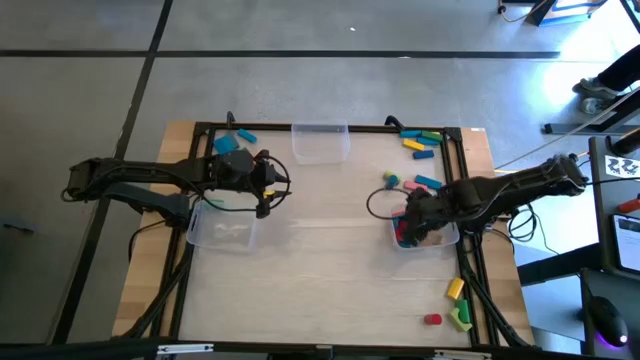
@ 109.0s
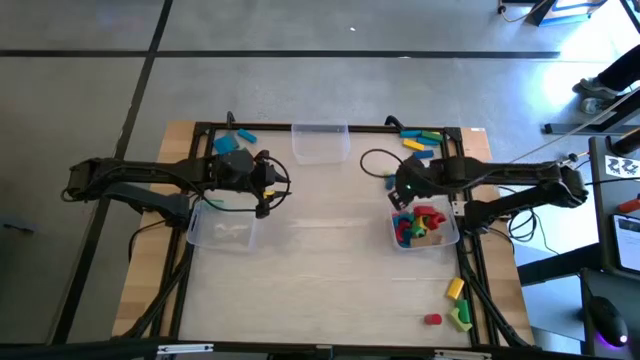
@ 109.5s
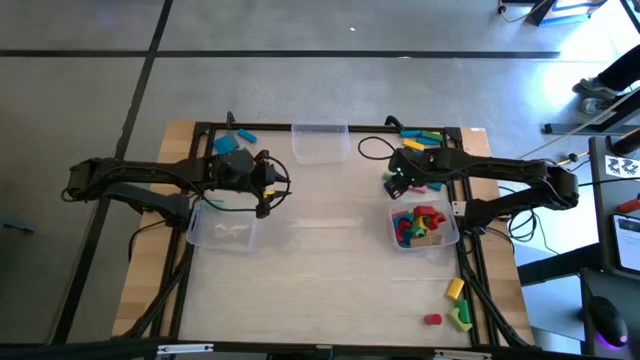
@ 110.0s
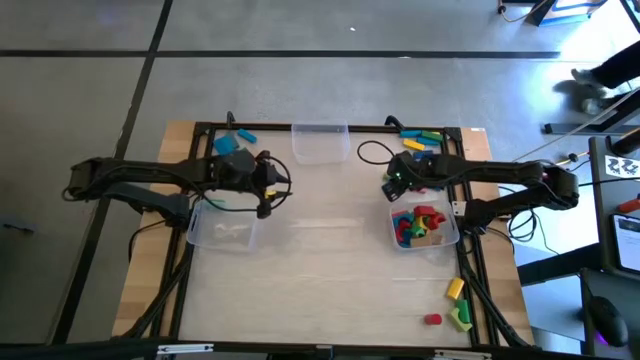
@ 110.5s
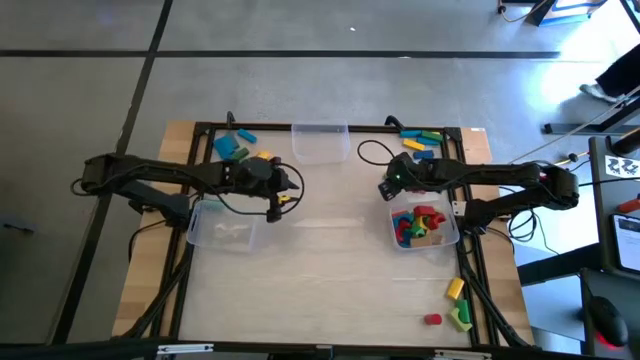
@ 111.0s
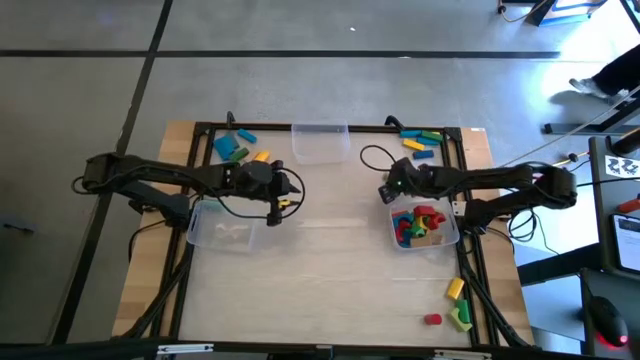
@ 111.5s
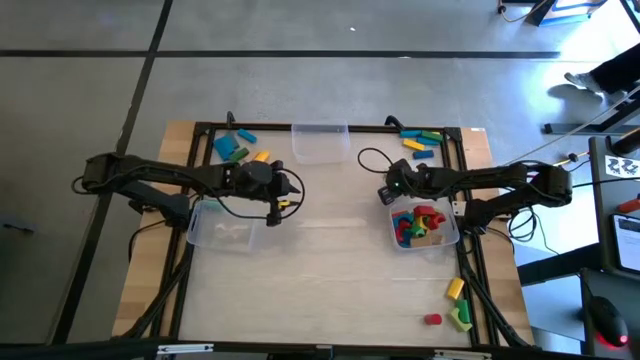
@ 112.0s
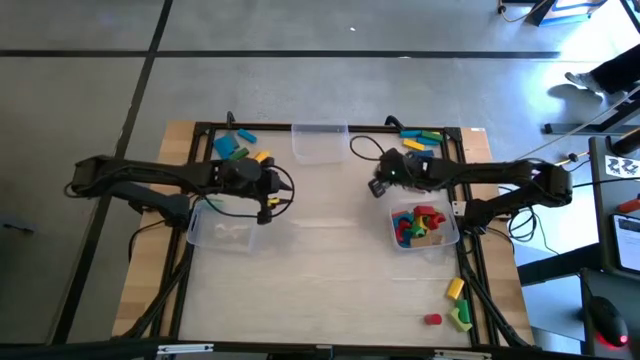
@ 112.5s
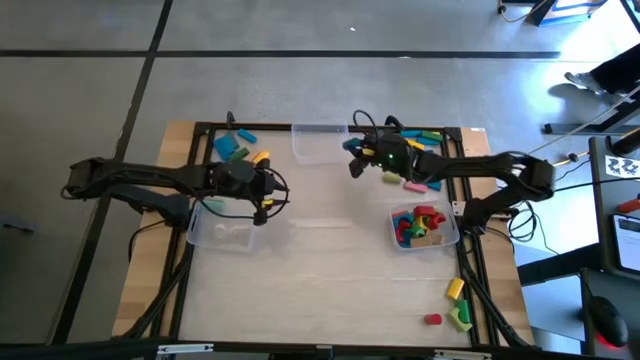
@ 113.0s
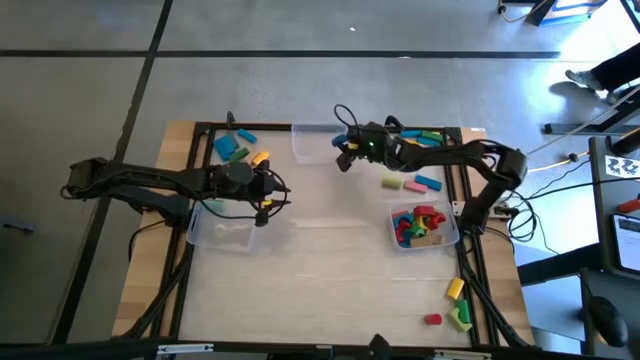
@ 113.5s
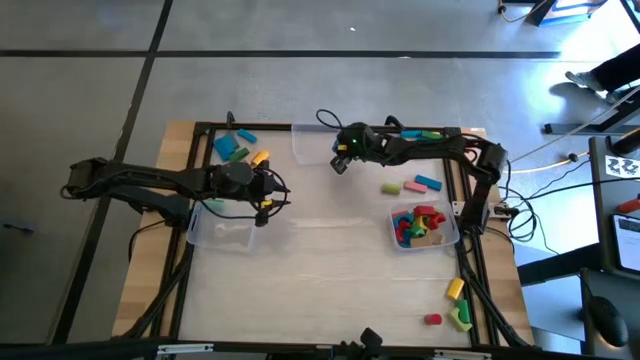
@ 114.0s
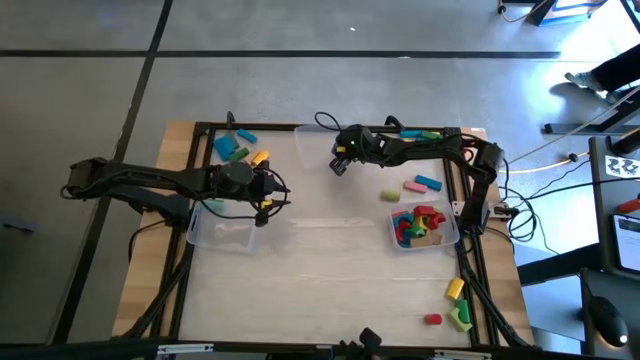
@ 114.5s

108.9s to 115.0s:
Task: Sort blocks by size
Put the blue cylindrical block into the top transparent bin

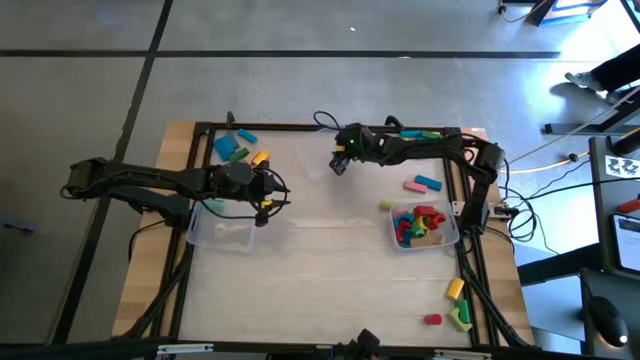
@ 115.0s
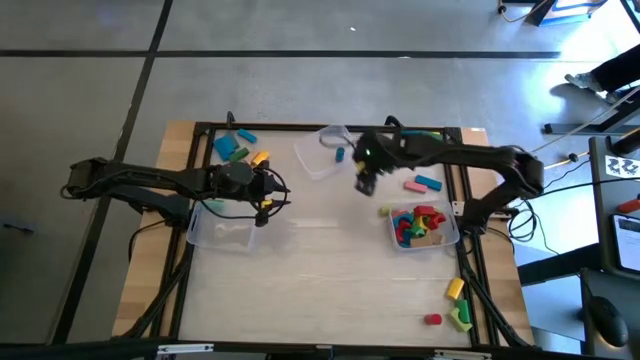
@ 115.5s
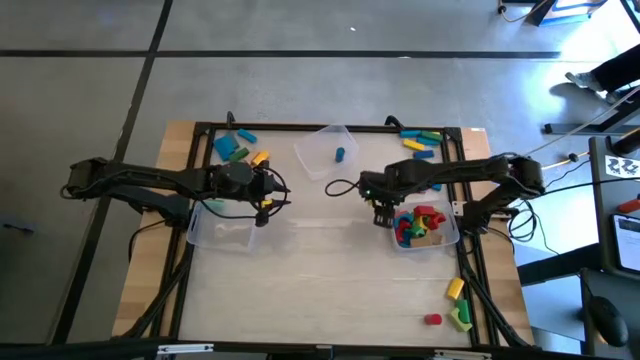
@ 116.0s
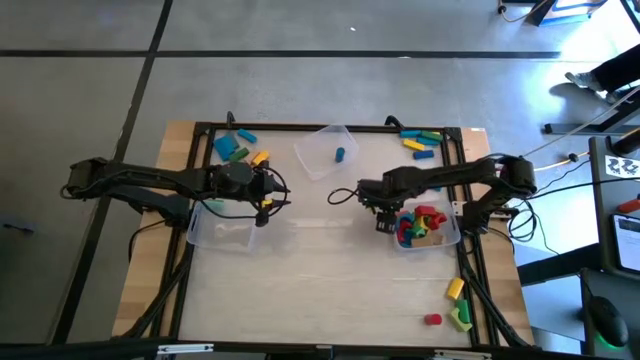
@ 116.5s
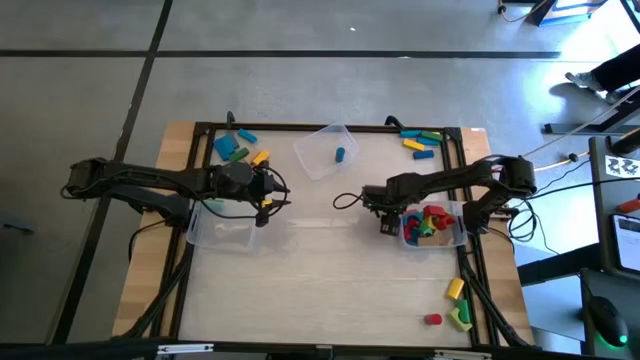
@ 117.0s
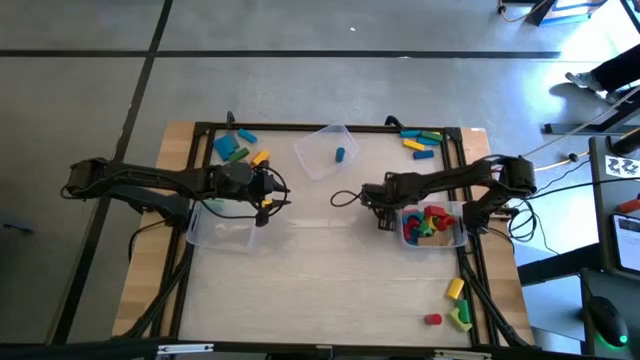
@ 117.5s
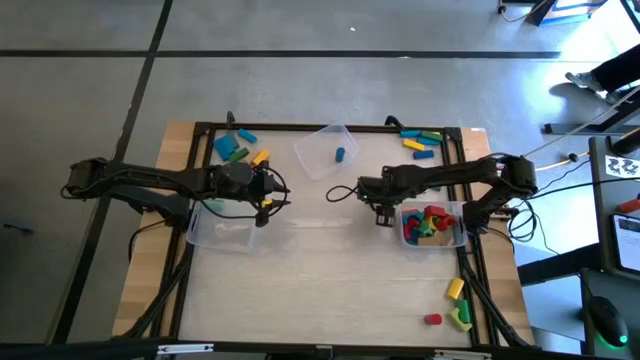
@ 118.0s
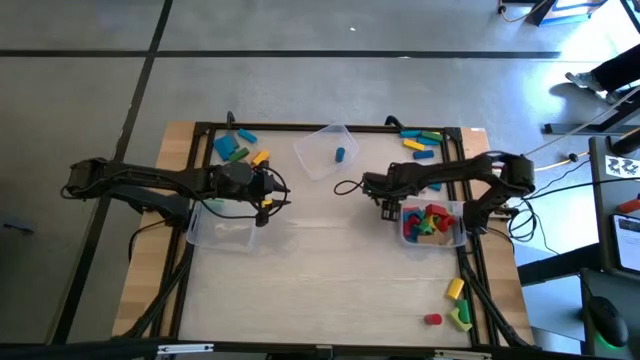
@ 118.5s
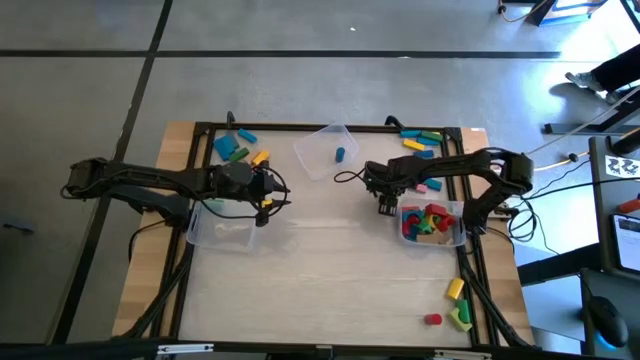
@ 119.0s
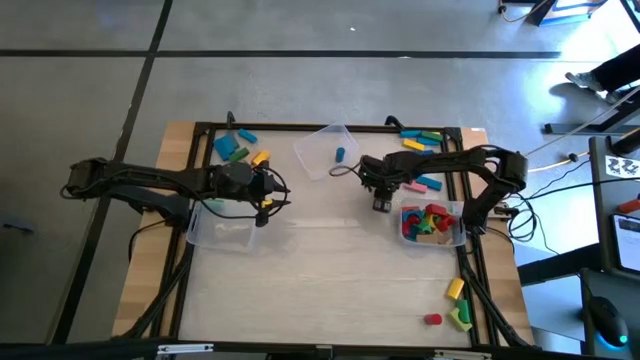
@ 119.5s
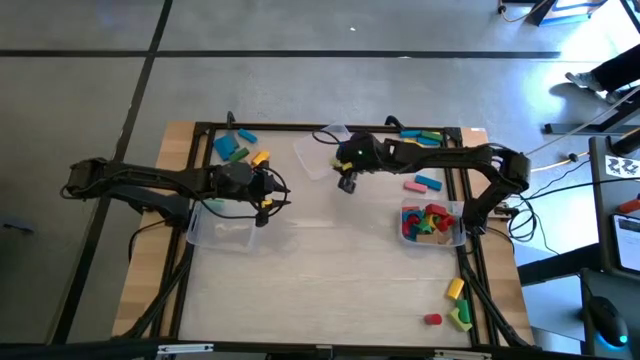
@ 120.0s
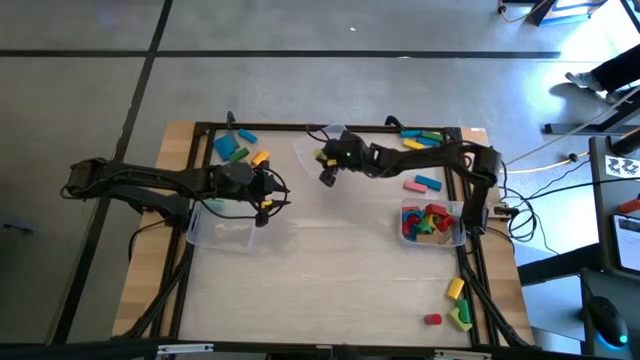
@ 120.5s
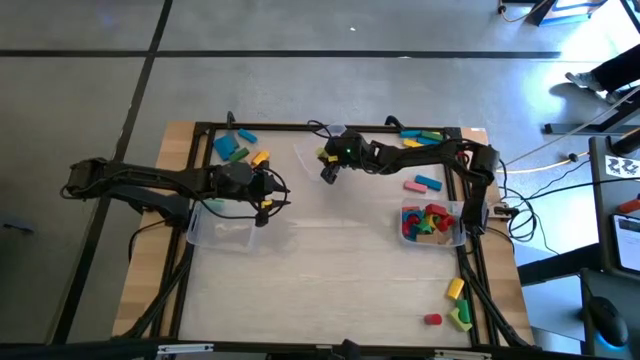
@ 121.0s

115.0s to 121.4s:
Put the light green cylindrical block into the top transparent bin

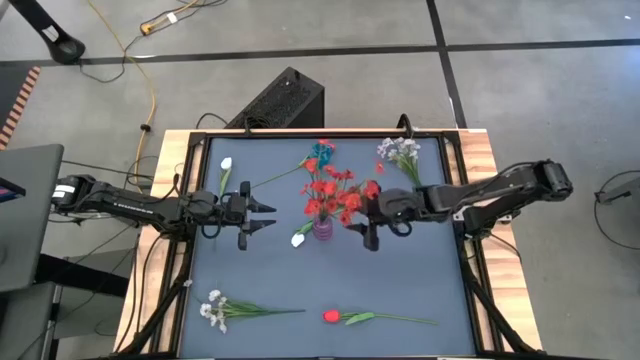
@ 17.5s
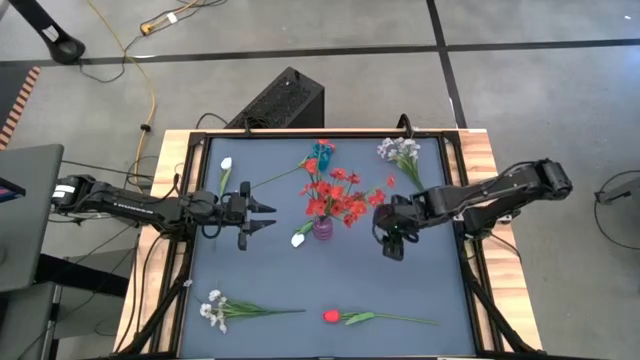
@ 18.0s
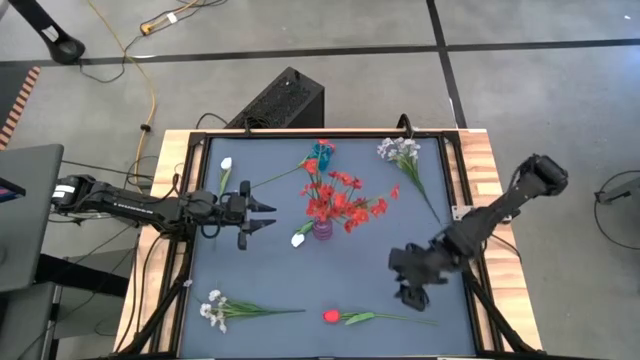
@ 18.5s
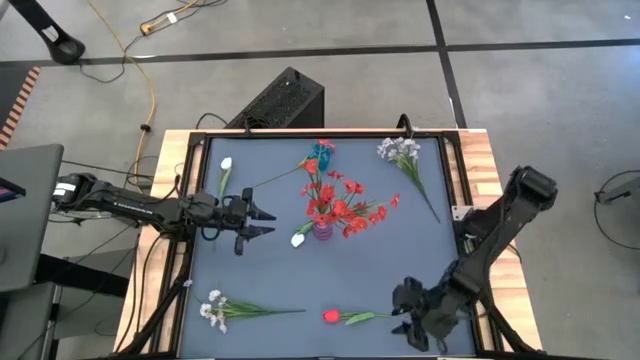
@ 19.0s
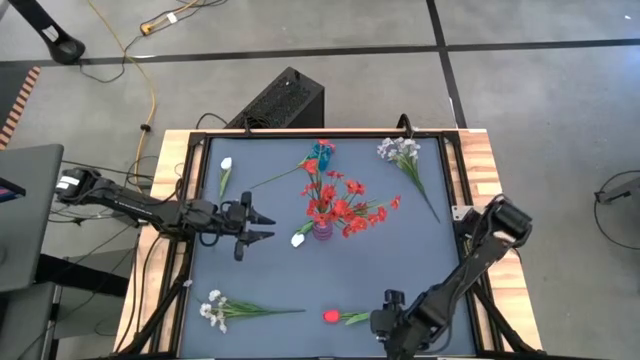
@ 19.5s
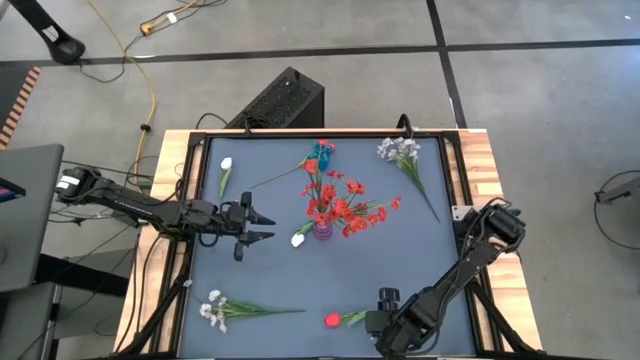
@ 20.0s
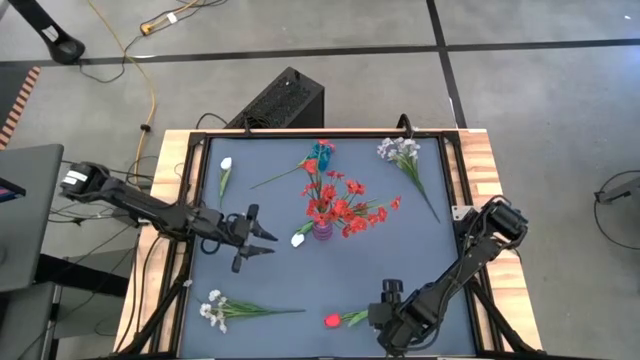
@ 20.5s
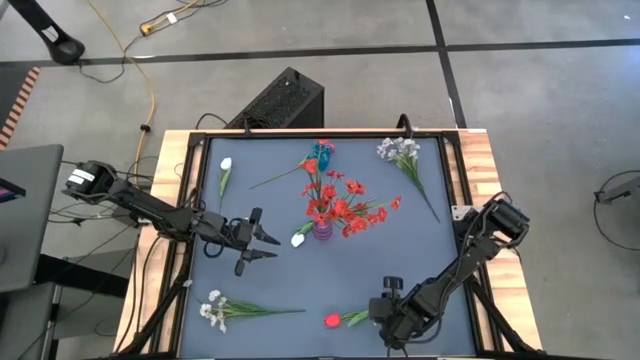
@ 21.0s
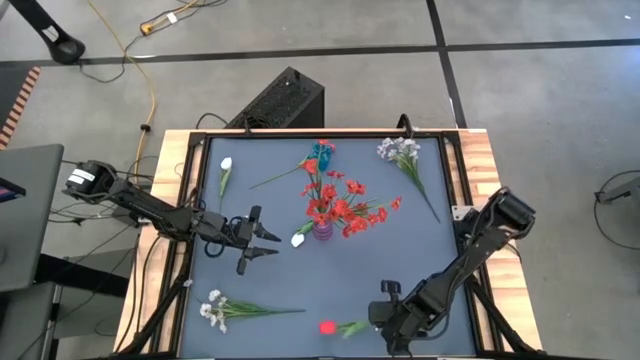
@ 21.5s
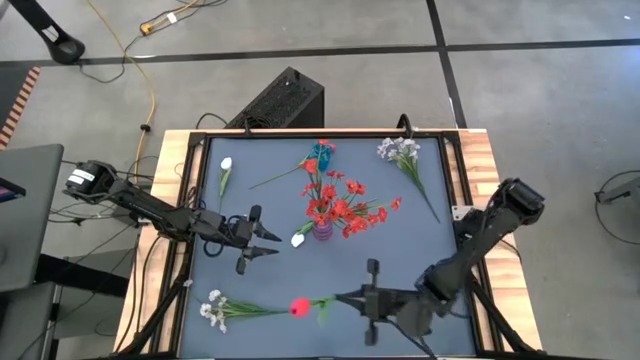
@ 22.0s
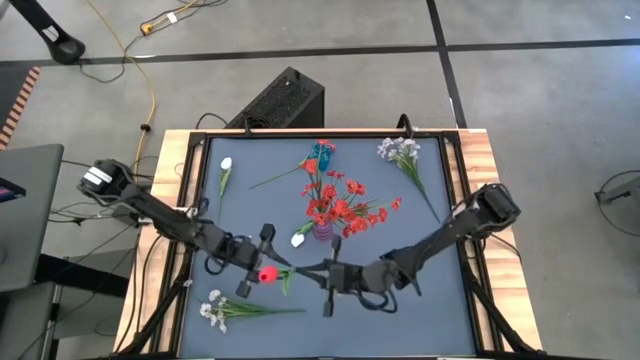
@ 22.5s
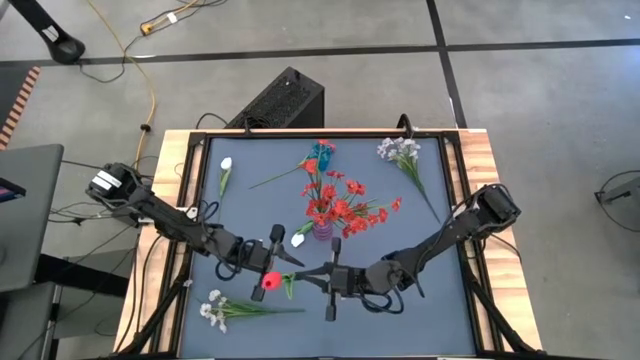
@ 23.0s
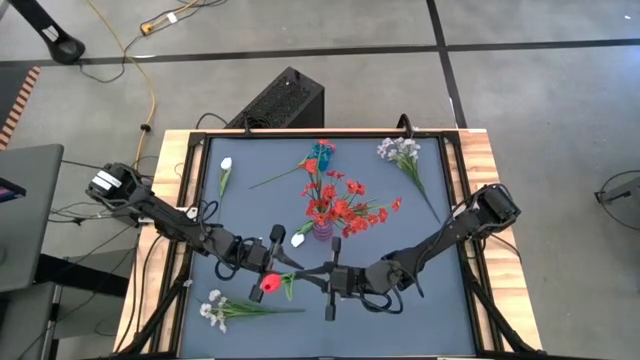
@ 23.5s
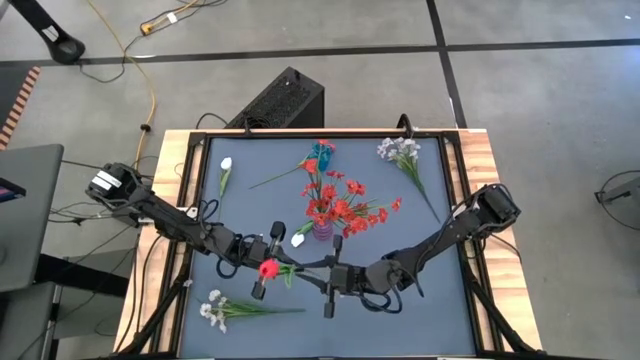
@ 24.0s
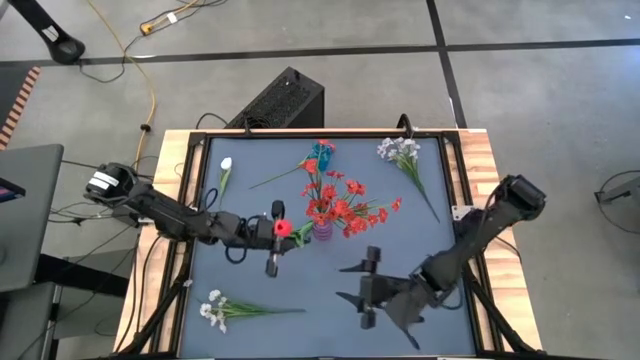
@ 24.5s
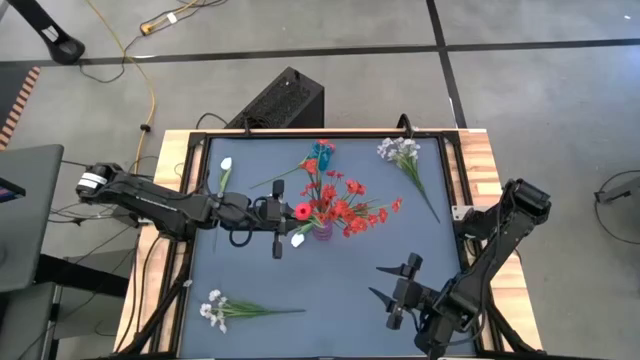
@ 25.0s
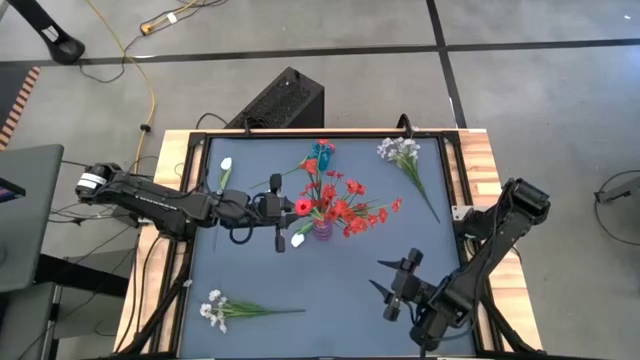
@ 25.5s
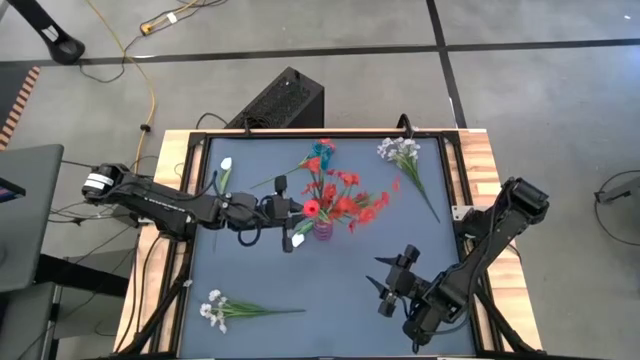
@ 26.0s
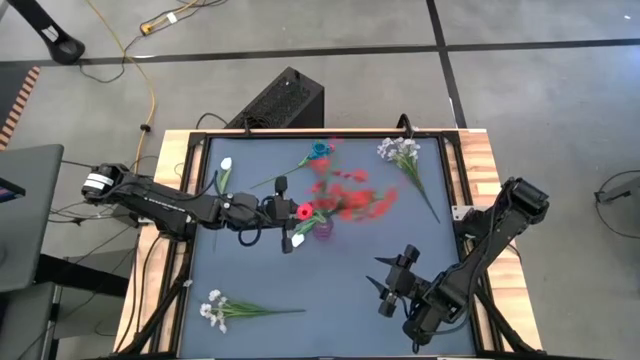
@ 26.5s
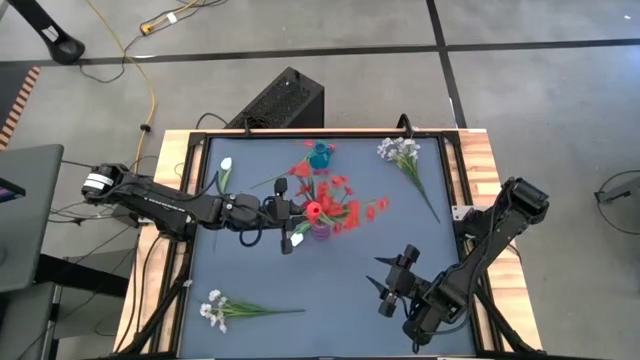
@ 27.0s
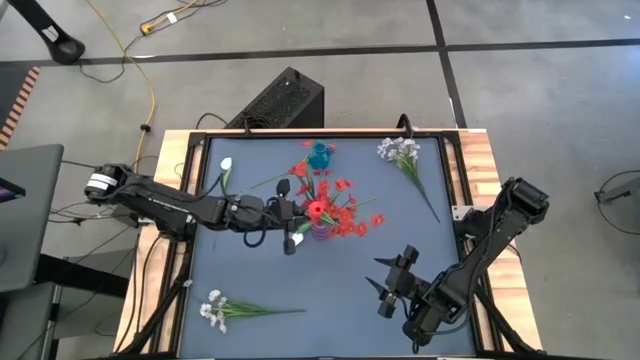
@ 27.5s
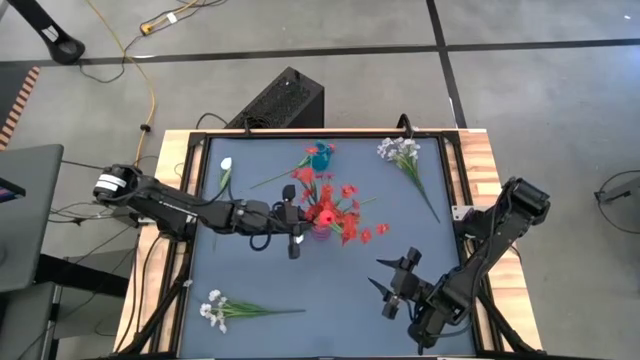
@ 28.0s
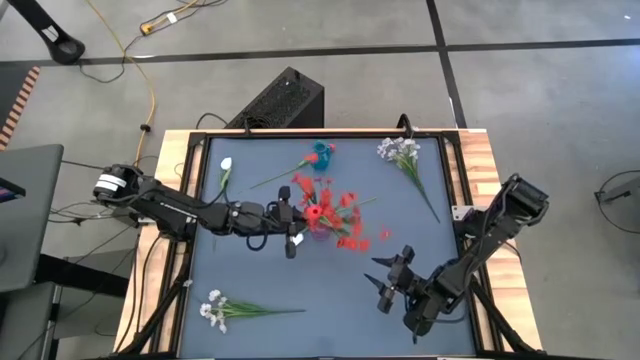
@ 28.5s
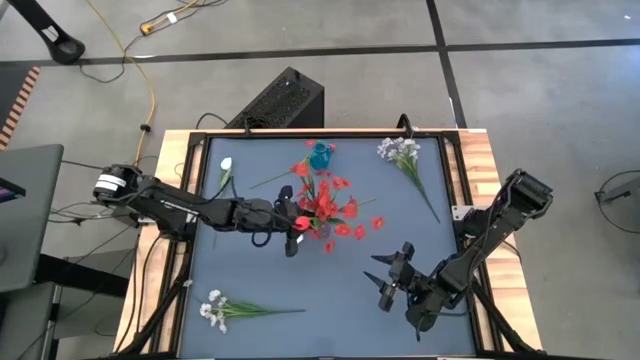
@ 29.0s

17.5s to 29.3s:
Task: Sort flowers into vase by color
Put the bottom red tulip into the violet vase
